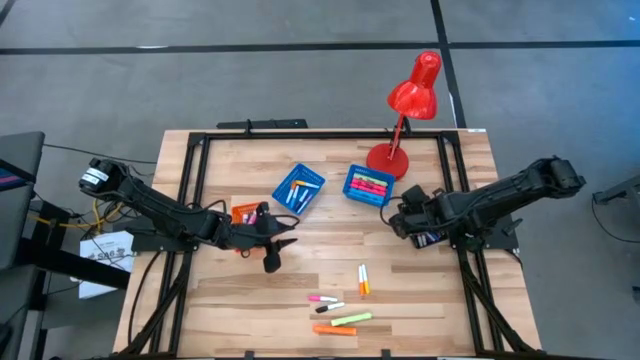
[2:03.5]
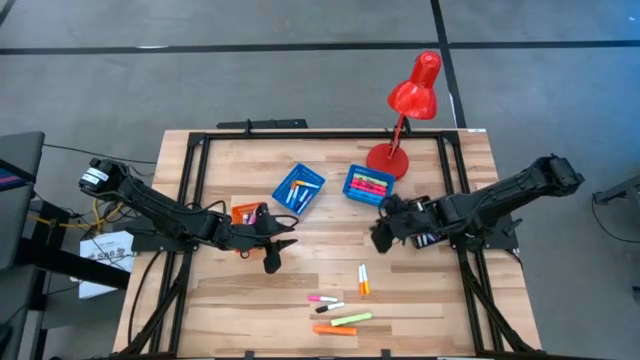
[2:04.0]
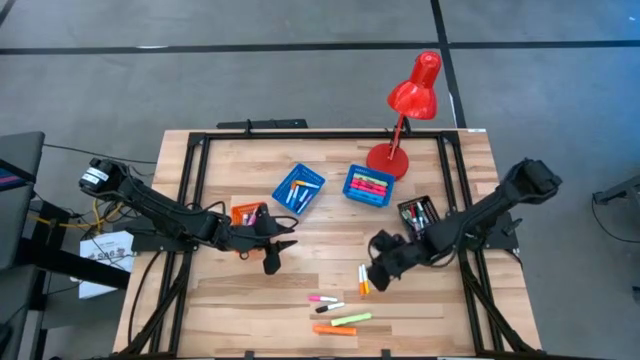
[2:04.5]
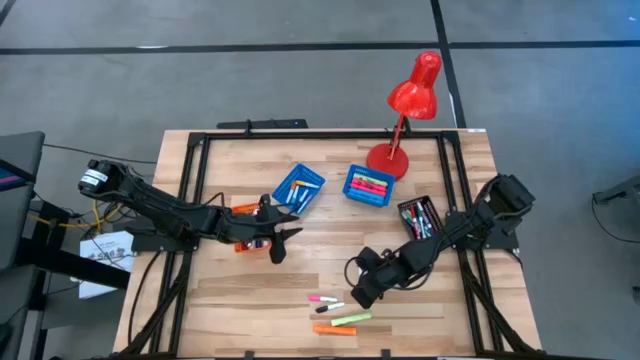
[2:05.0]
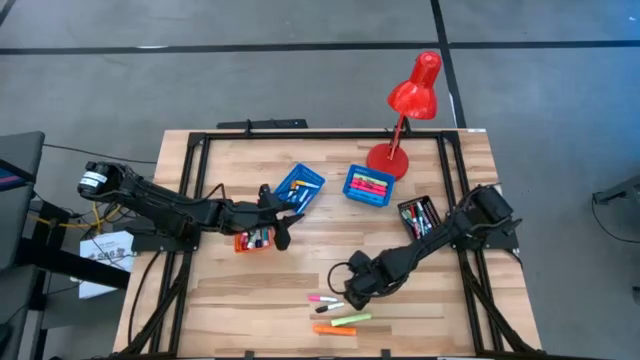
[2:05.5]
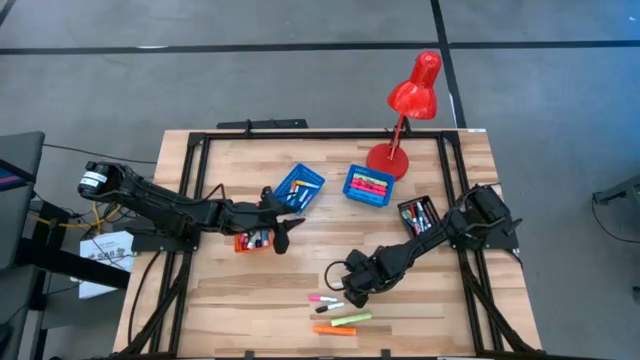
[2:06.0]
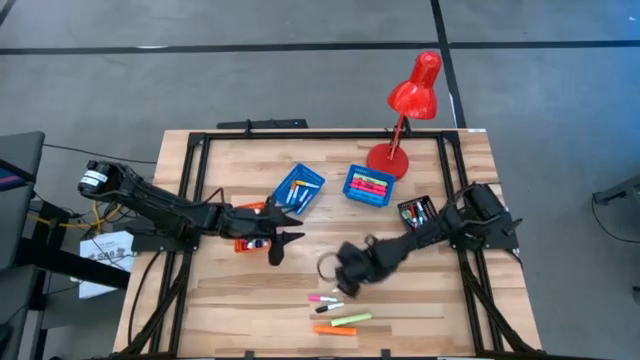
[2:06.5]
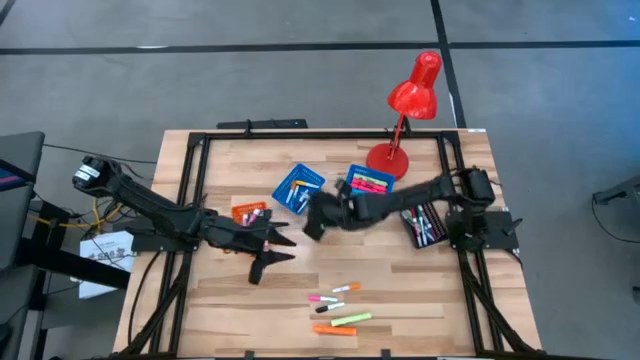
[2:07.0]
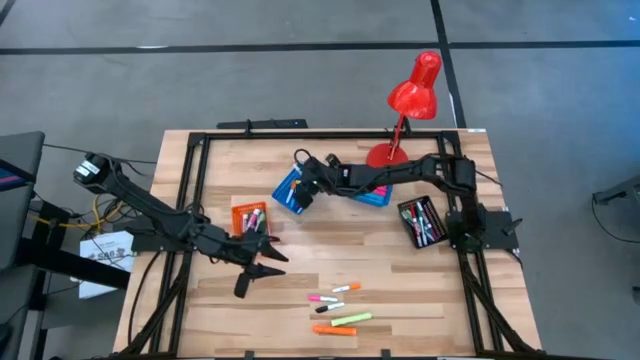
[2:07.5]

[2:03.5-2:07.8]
Task: Pick & Place Markers
Put the small yellow highlighter pen into the left blue bin

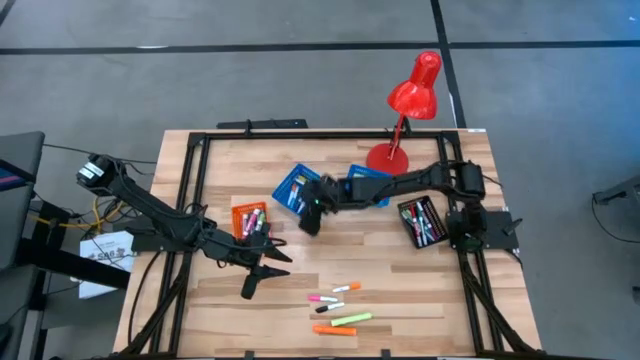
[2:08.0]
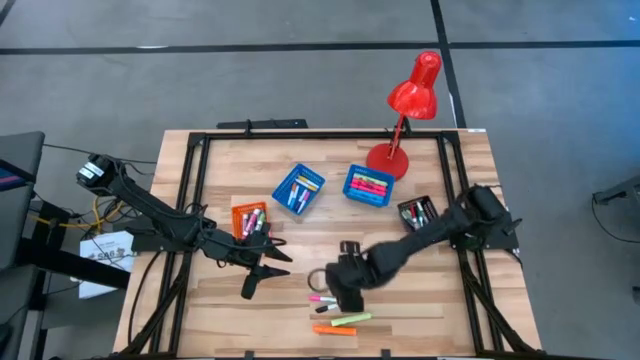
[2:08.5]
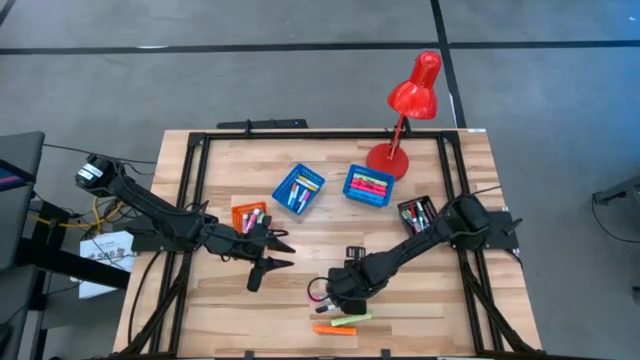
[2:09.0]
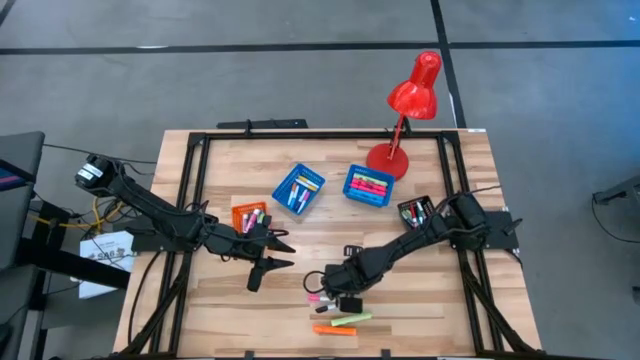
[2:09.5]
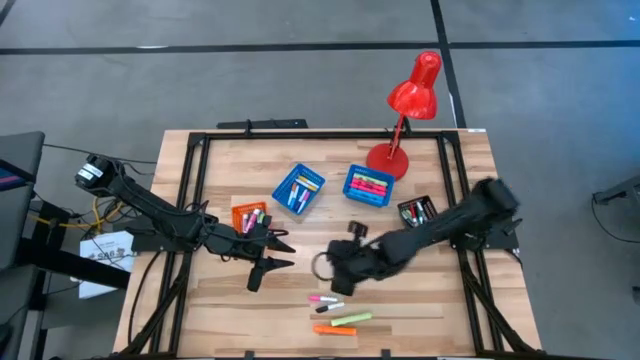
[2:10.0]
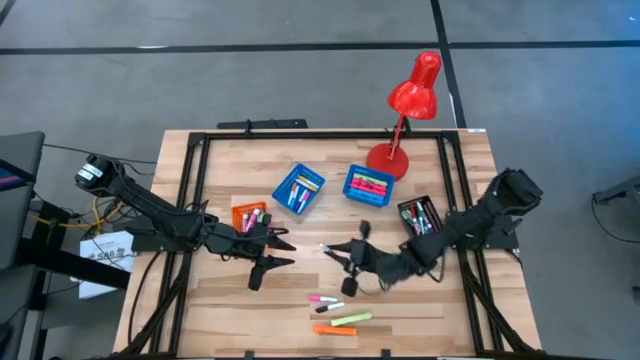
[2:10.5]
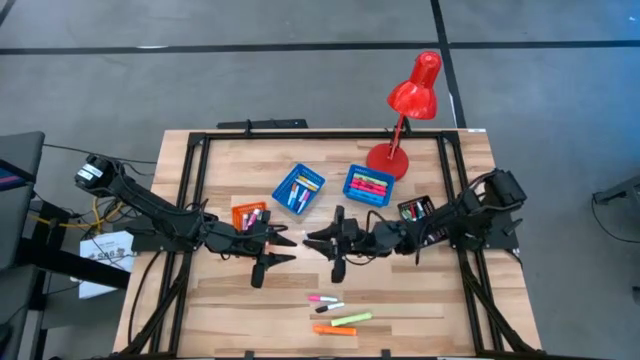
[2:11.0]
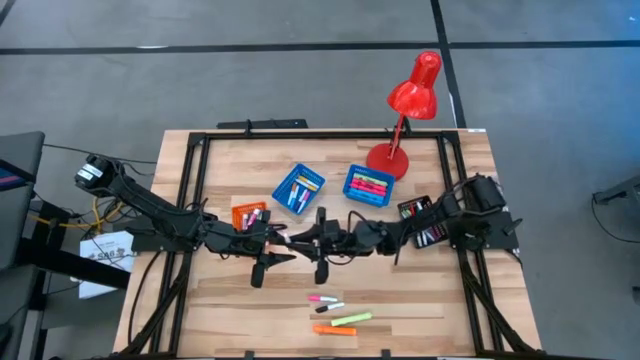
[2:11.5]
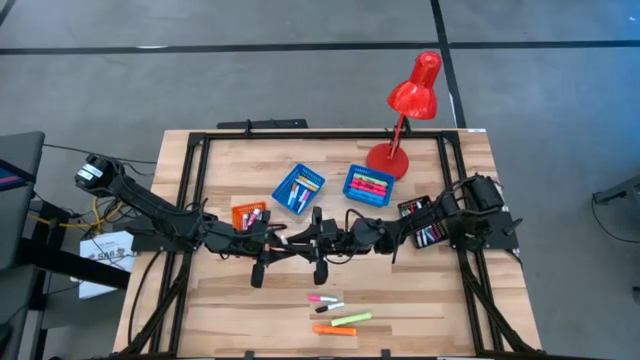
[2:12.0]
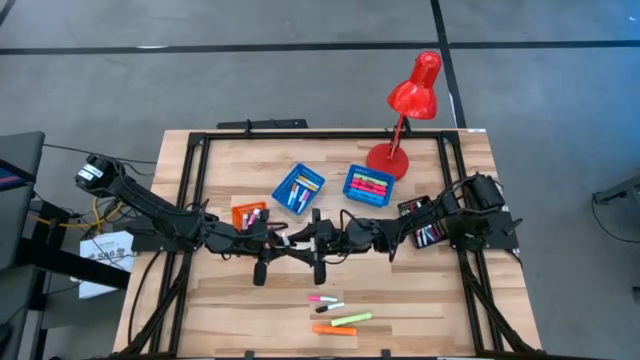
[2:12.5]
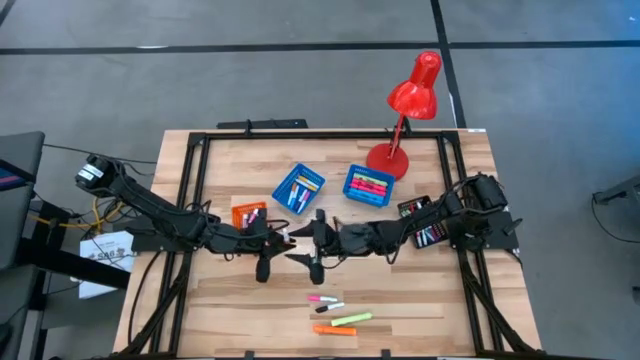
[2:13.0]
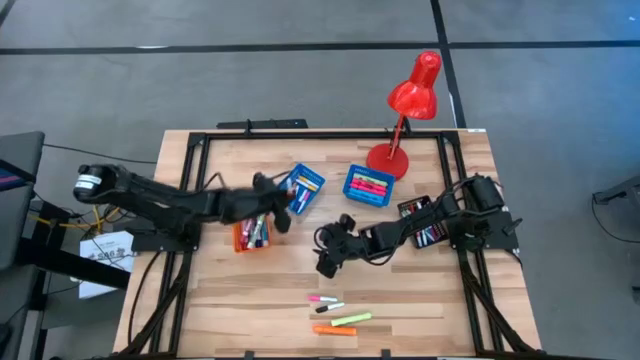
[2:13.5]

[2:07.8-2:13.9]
Put the small orange highlighter pen into the left blue bin

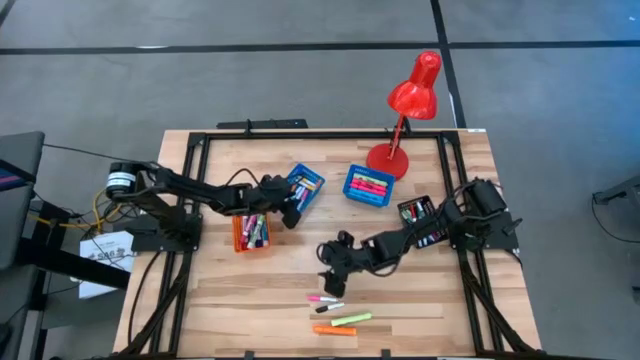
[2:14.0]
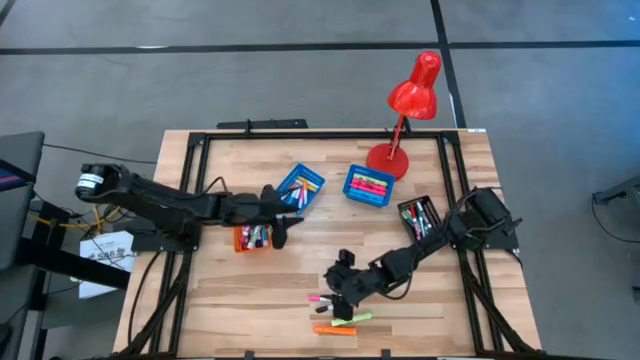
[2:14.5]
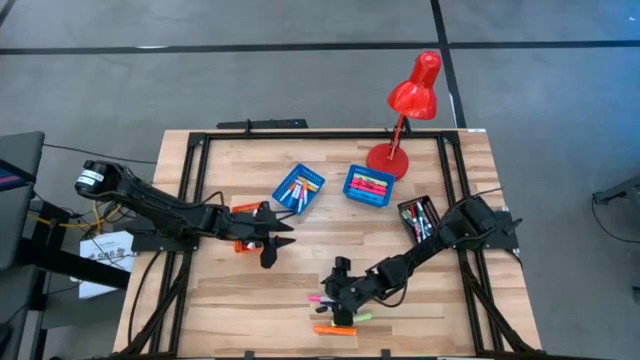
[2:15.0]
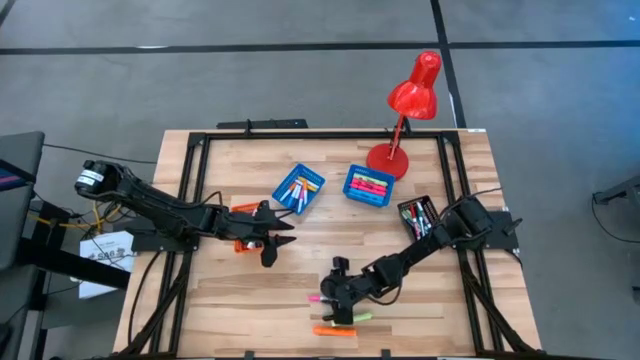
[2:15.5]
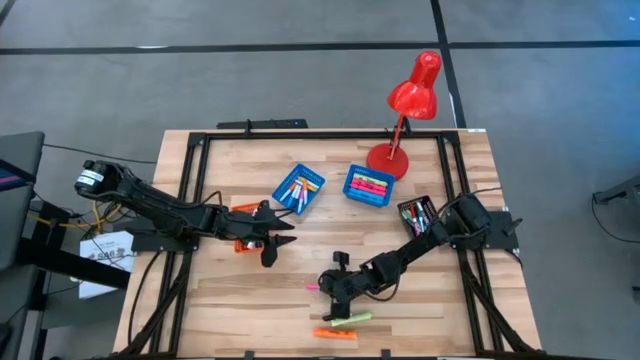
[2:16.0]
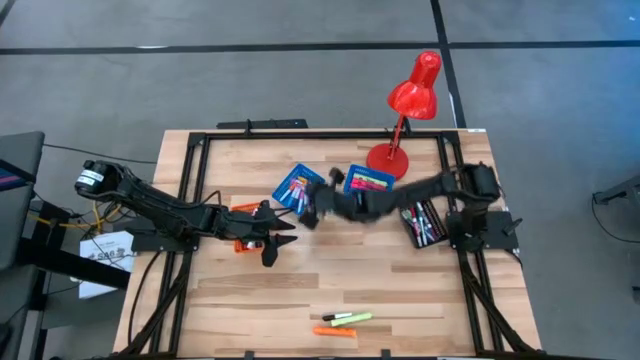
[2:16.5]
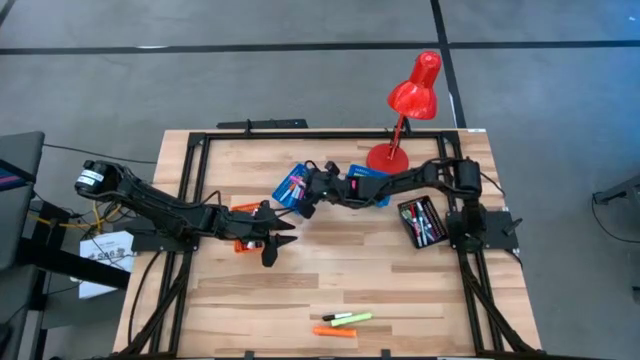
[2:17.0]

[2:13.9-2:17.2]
Put the small pink highlighter pen into the left blue bin

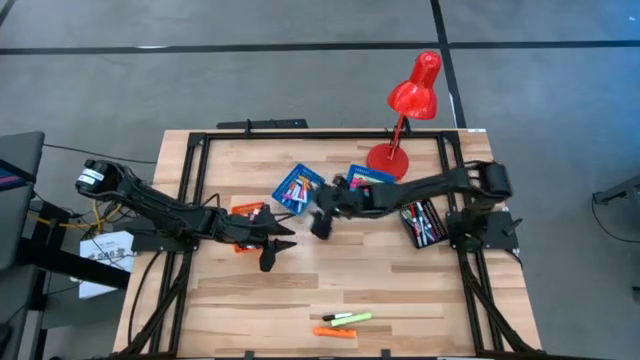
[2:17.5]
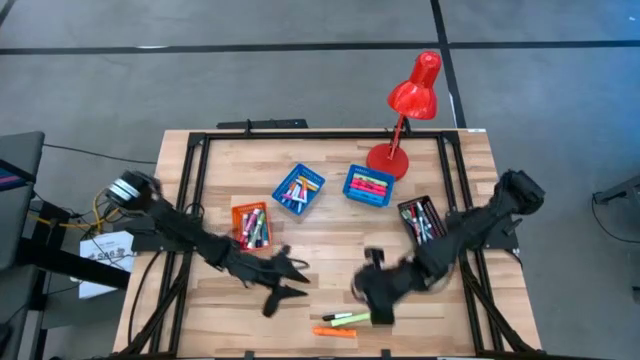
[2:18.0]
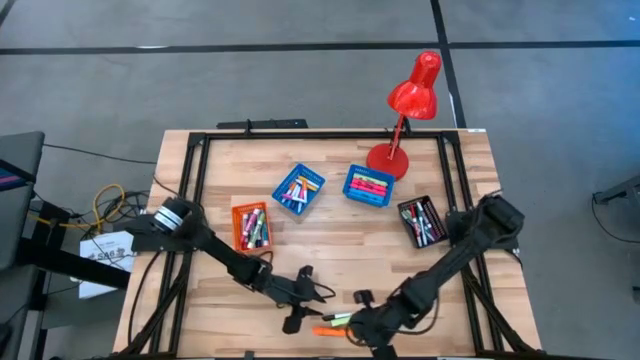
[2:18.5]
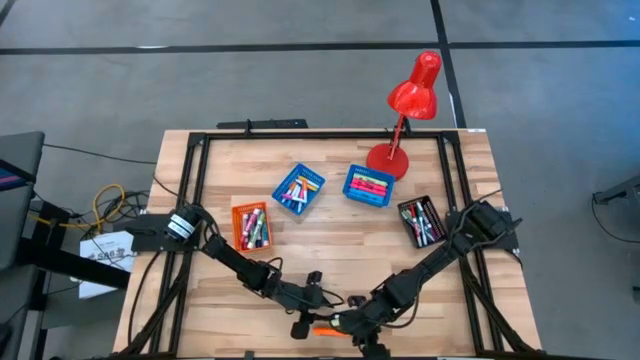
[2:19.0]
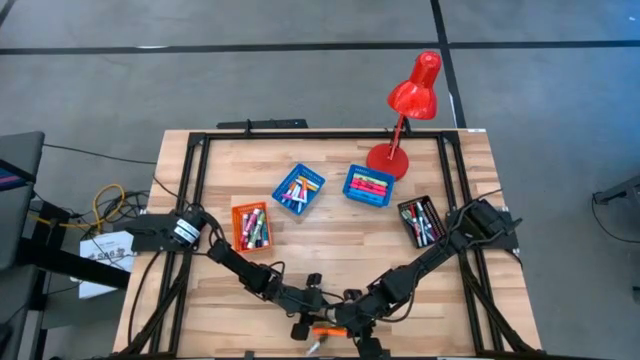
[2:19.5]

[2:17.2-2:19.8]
Put the small black highlighter pen into the left blue bin

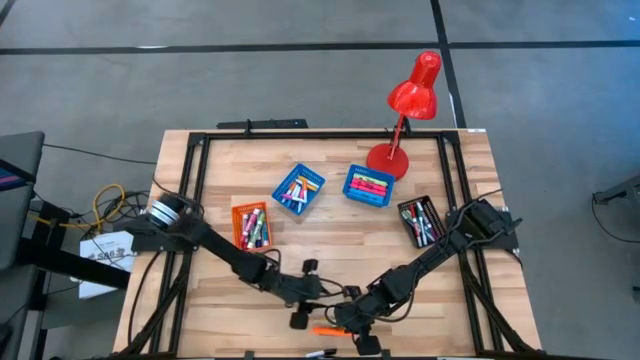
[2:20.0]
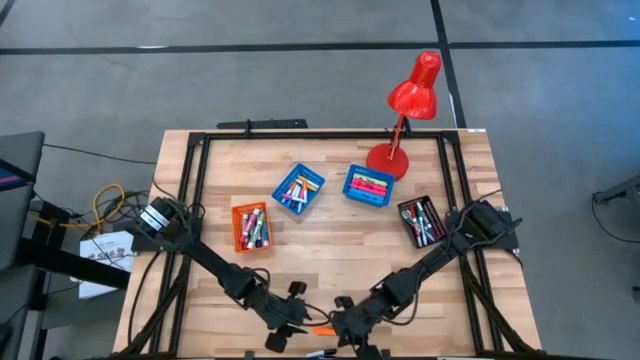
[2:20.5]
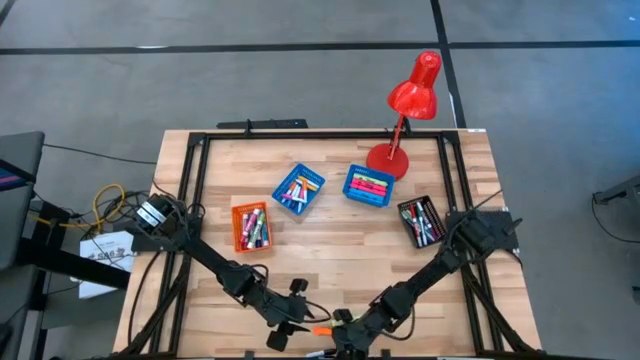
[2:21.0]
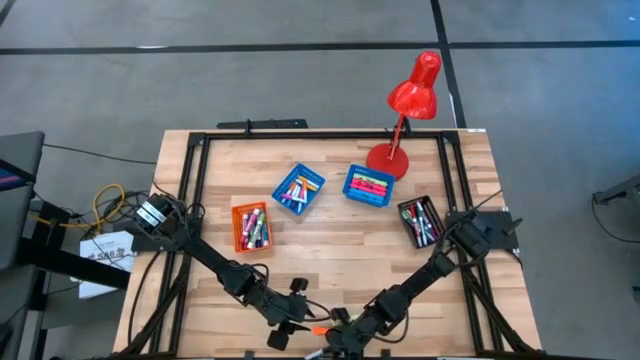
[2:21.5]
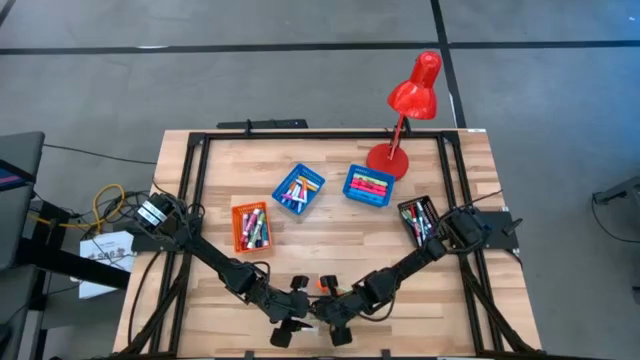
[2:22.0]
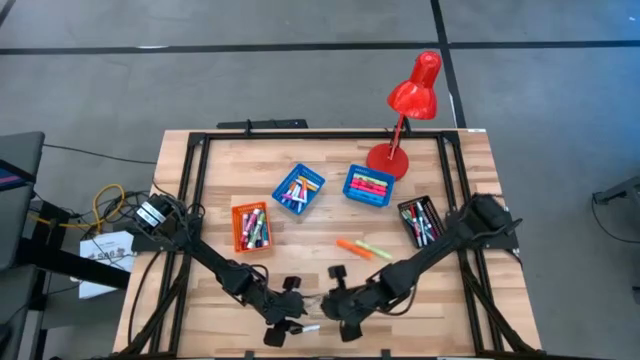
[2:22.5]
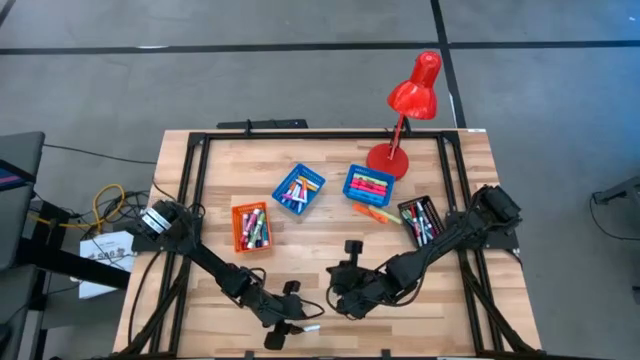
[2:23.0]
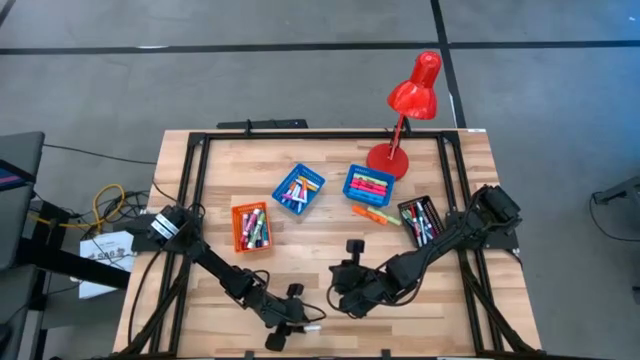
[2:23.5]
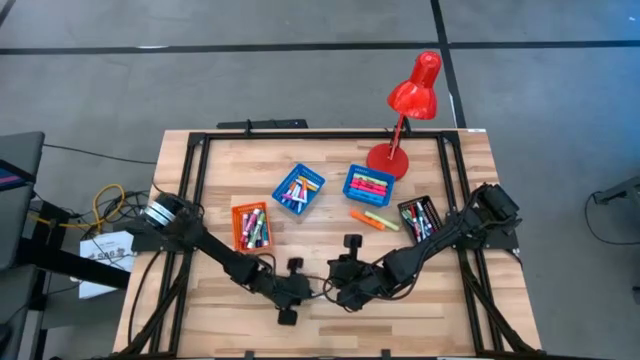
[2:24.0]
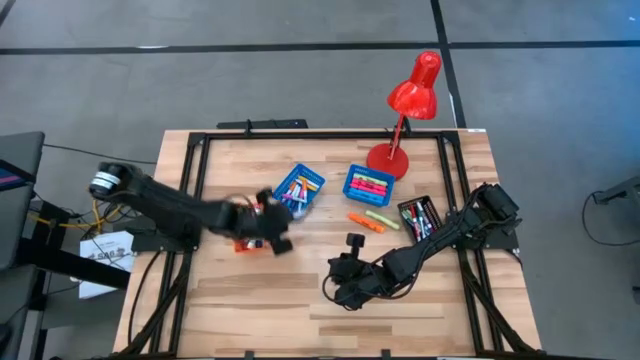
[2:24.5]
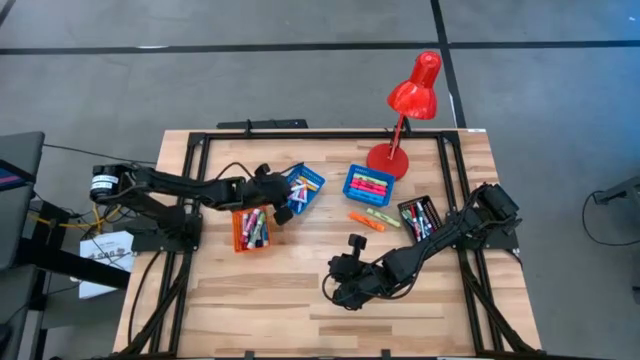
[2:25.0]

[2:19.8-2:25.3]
Put the small black highlighter pen into the left blue bin
